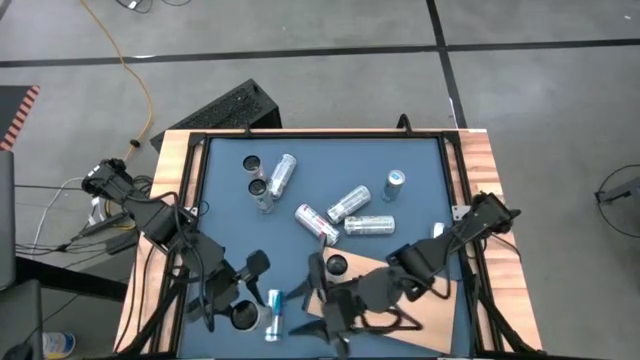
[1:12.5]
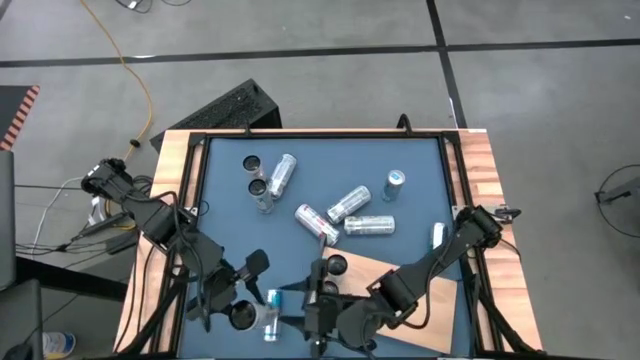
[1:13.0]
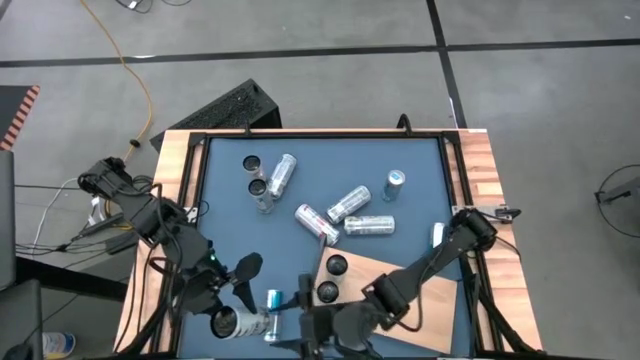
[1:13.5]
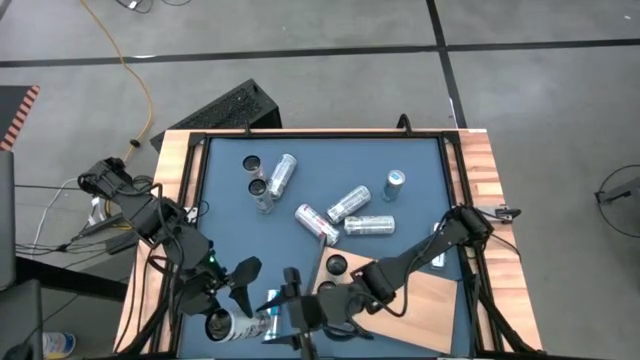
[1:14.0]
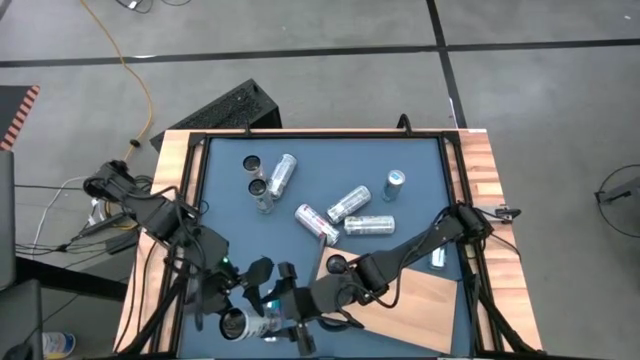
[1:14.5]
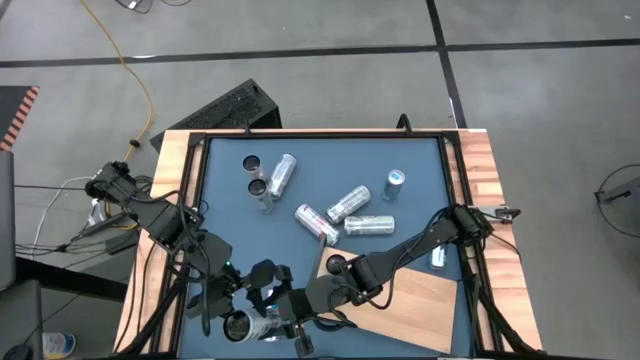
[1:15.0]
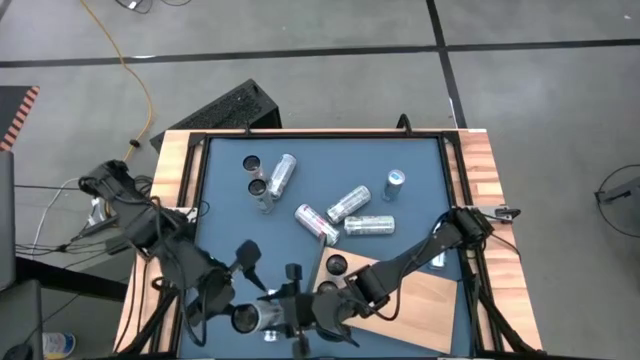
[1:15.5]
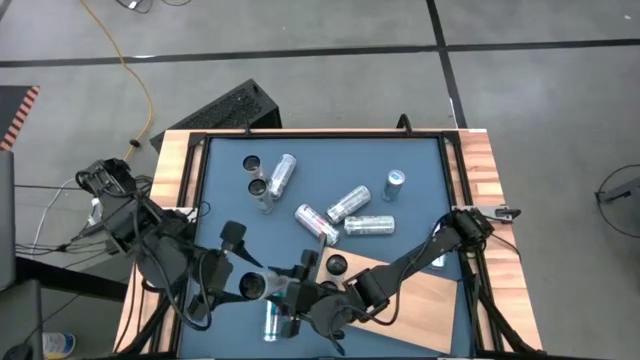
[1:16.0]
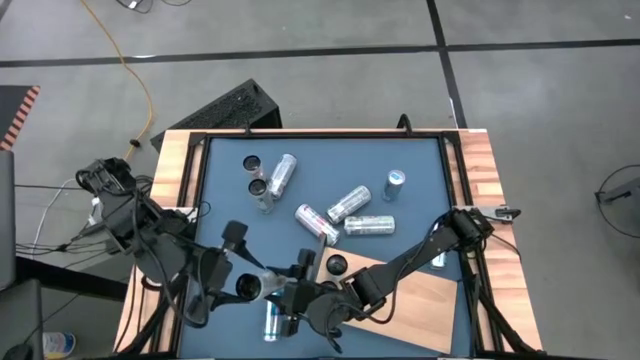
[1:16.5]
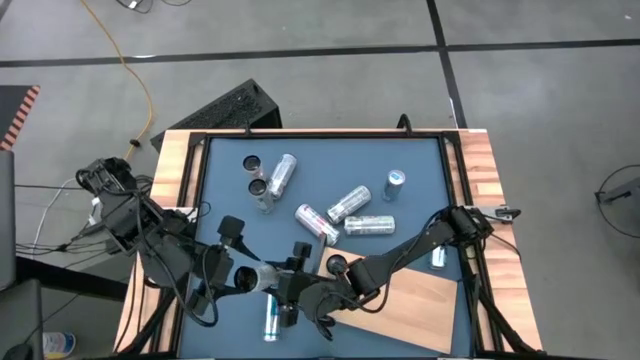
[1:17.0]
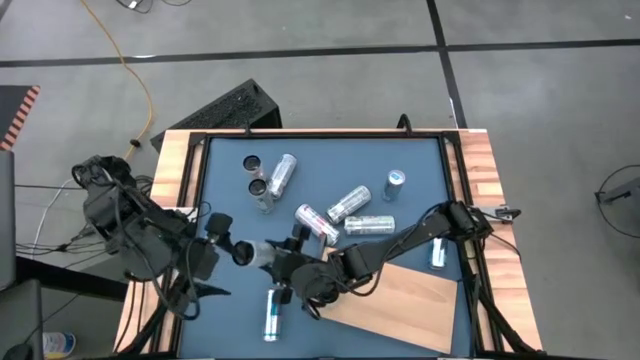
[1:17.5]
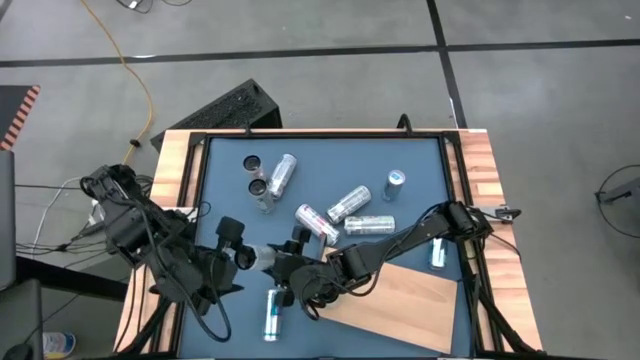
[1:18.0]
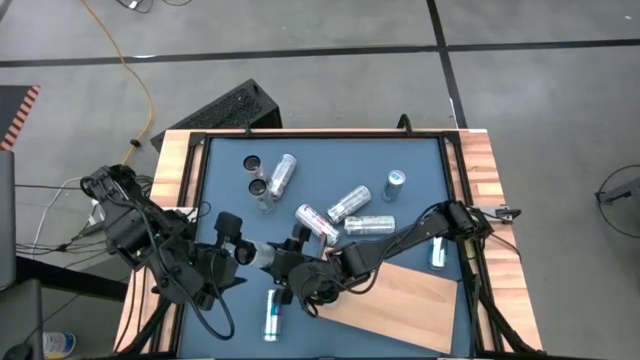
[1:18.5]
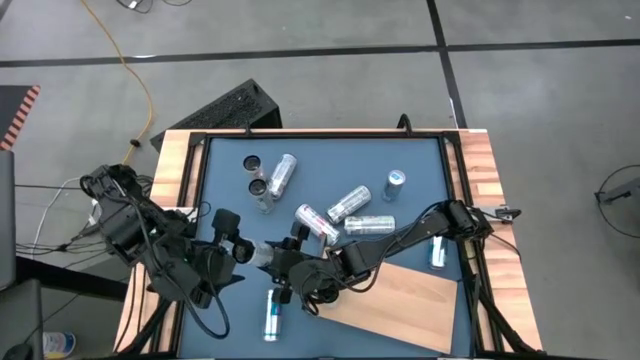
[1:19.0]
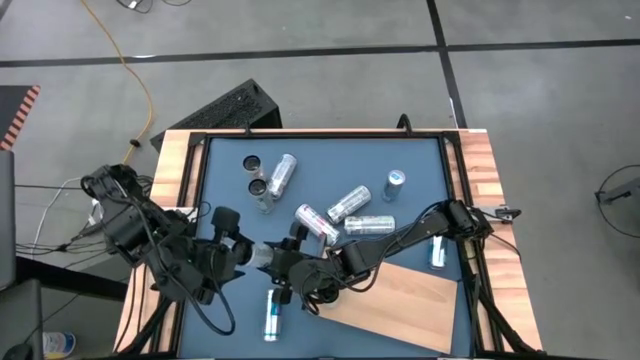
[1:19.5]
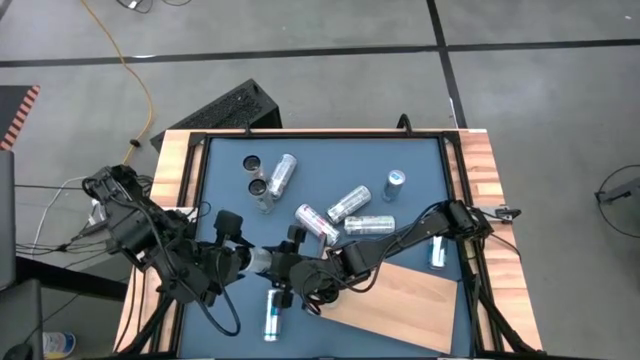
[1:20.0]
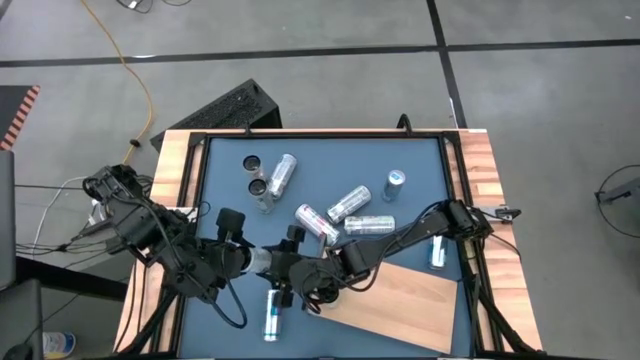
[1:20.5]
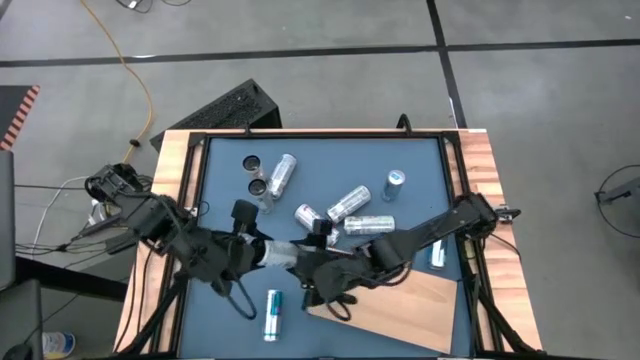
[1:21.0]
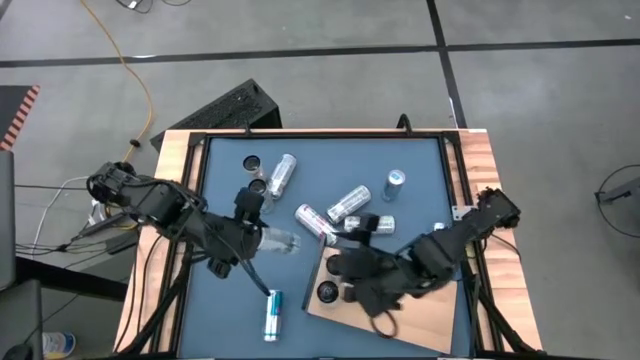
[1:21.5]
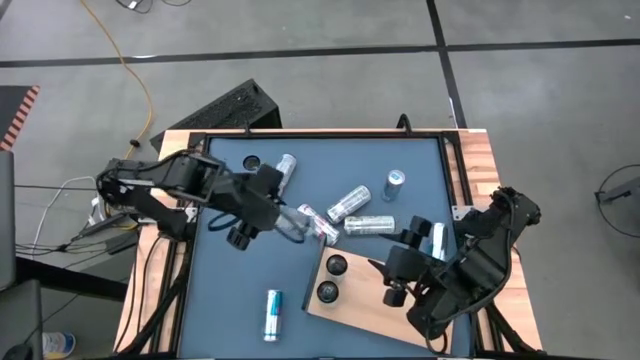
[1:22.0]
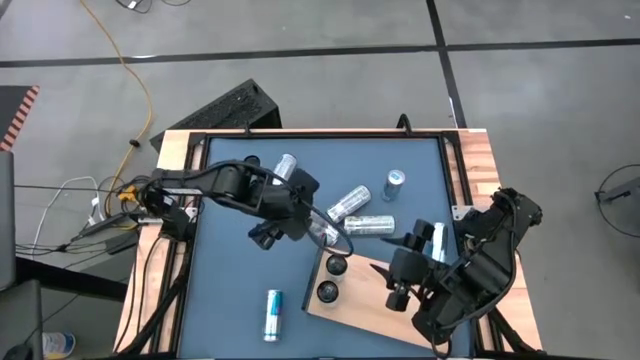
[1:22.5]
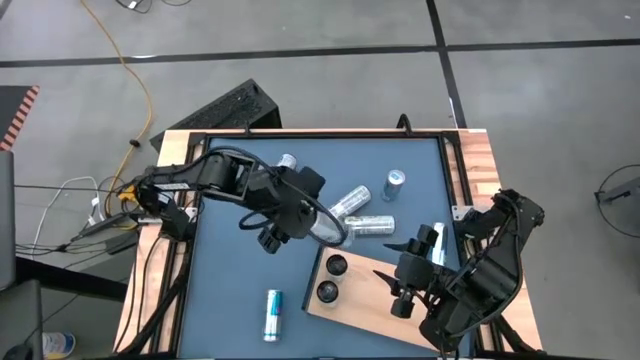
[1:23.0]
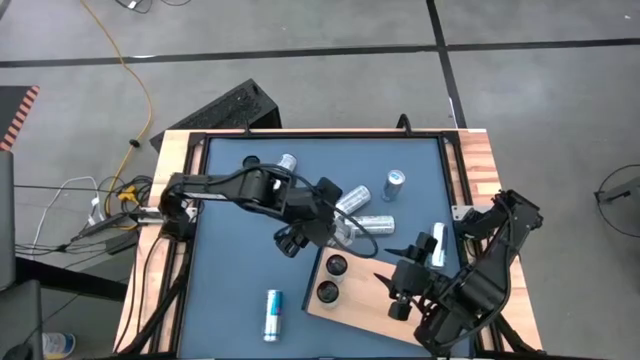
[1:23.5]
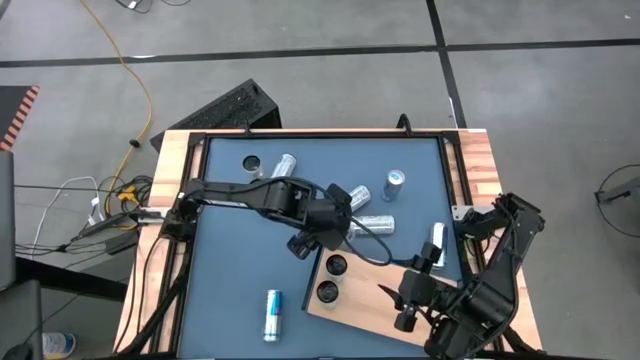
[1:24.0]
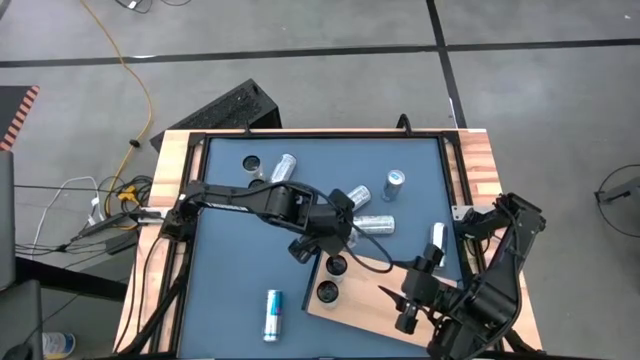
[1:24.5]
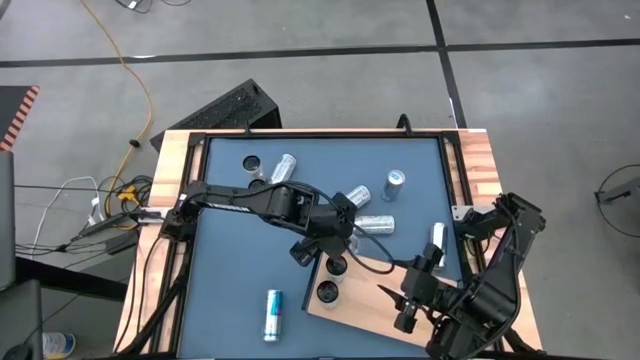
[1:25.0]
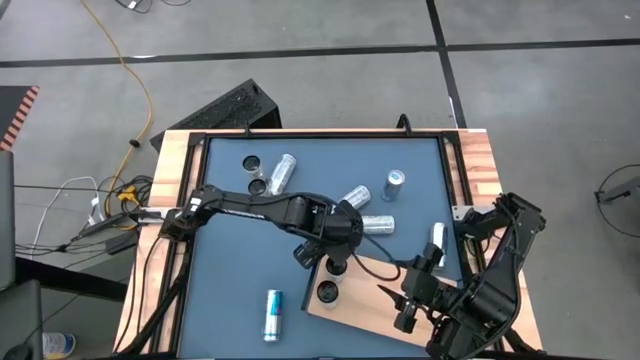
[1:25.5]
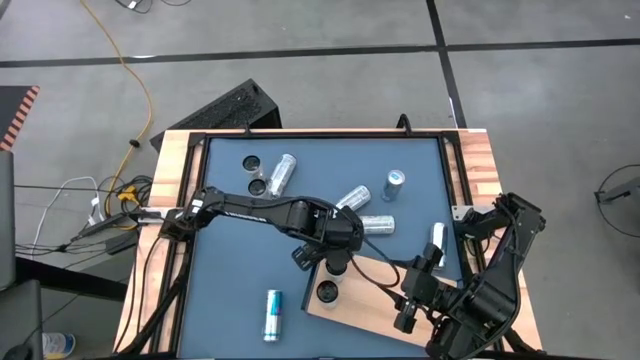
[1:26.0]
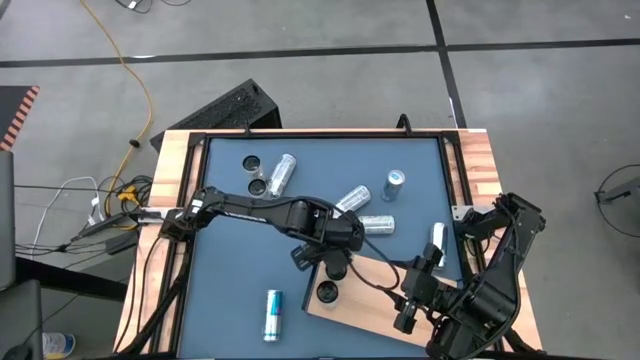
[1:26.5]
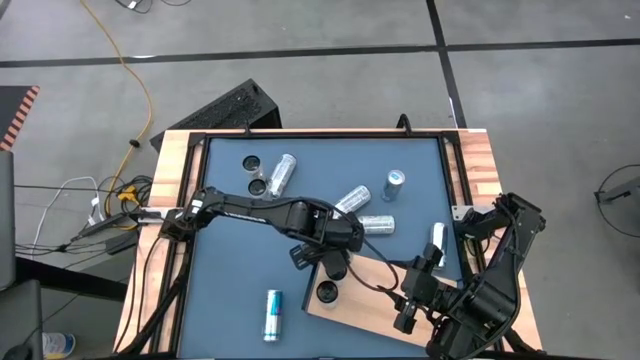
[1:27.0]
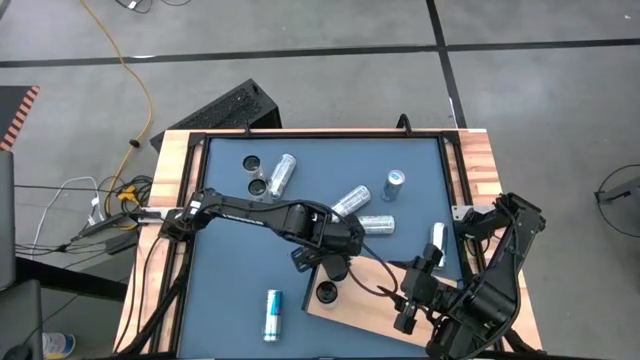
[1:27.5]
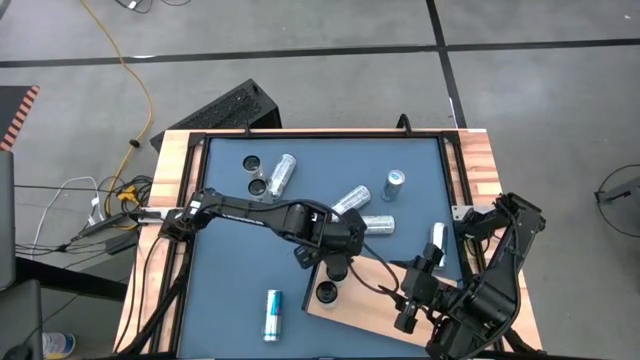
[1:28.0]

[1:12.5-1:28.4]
Task: Place canned beverage on shelf
Put the white blue can on the shelf

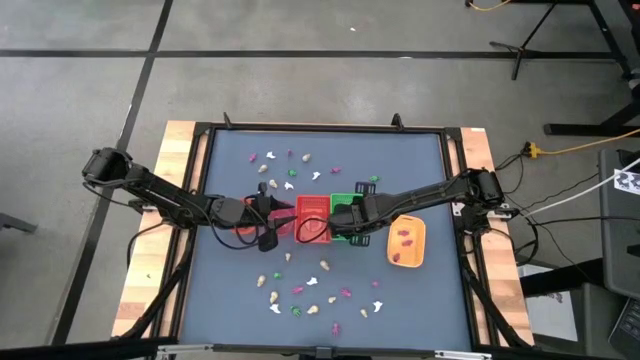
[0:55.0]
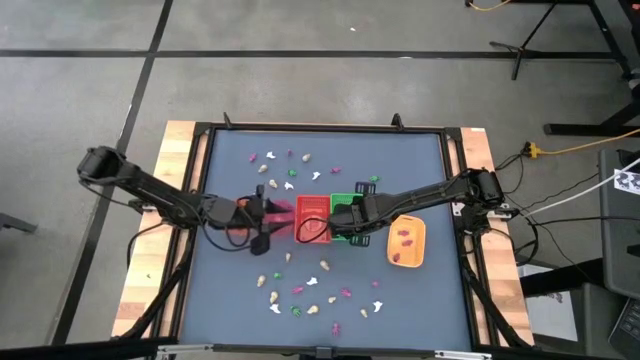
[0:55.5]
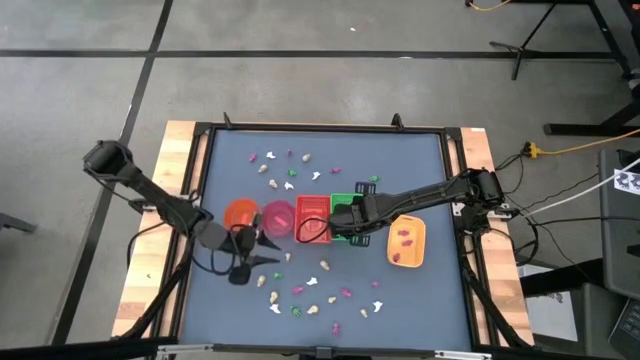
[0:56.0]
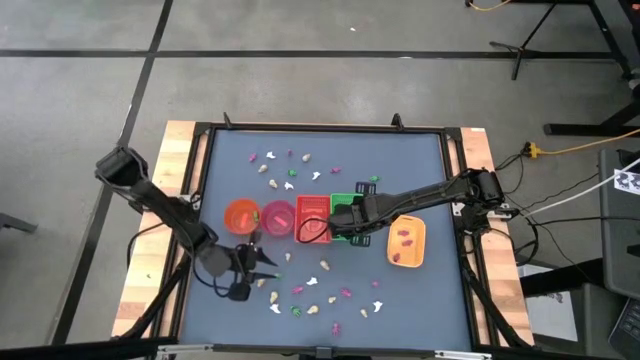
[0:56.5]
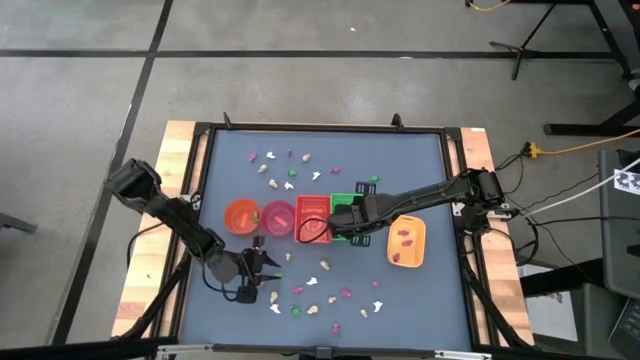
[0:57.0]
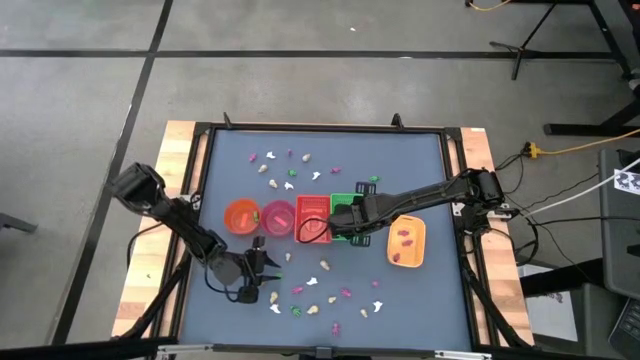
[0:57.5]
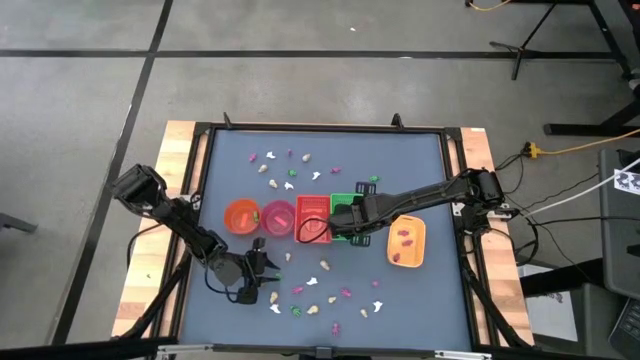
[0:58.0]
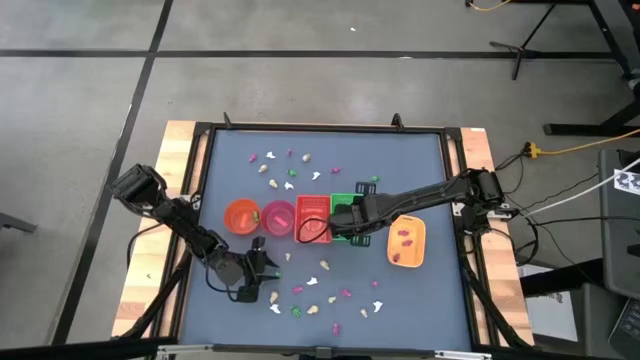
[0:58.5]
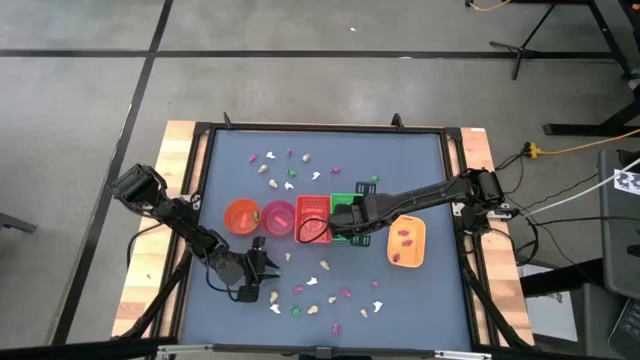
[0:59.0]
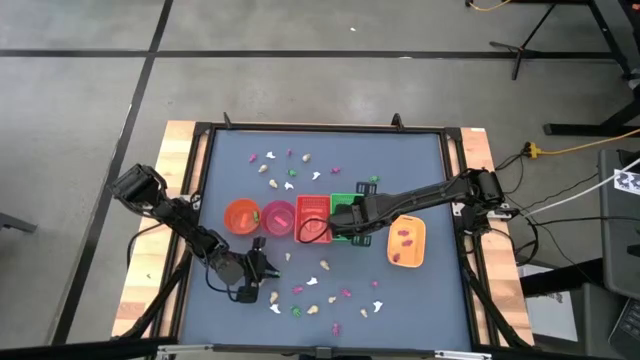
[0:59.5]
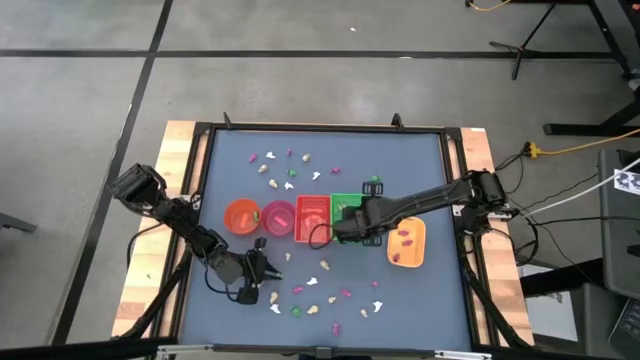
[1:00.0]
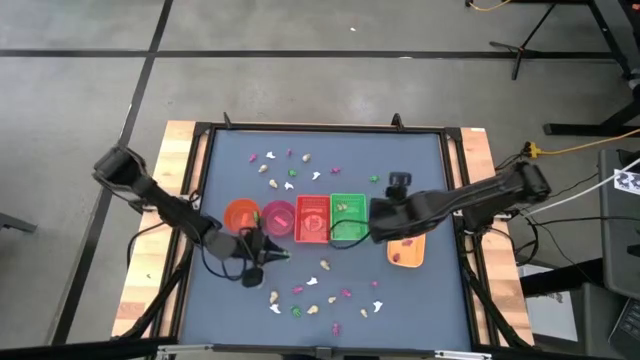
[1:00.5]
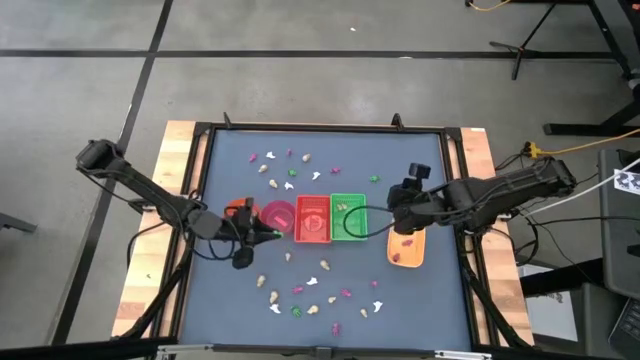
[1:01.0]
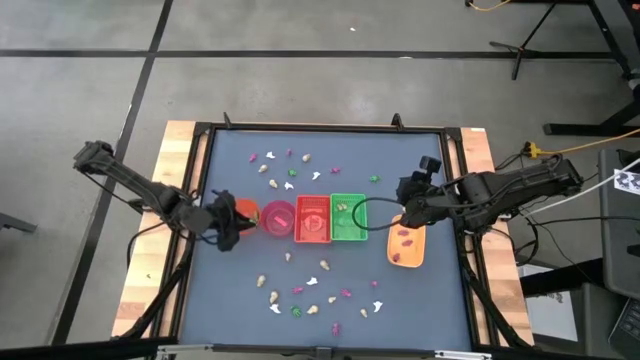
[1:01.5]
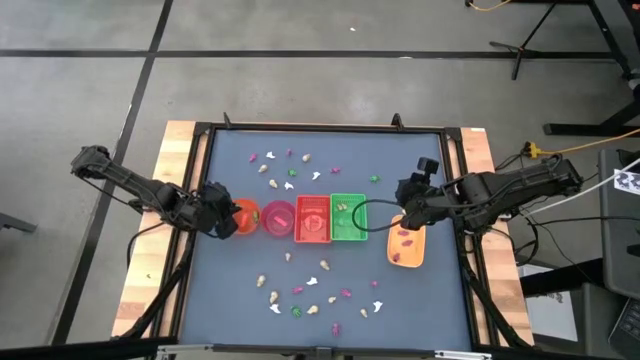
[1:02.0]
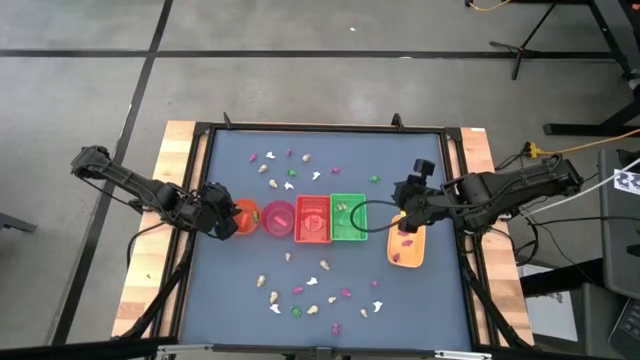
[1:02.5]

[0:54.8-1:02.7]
Task: Sort Halloween decoration
Put the green skeleton toy into the orange bowl
